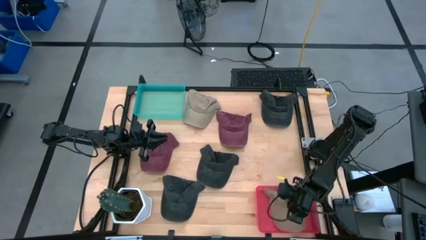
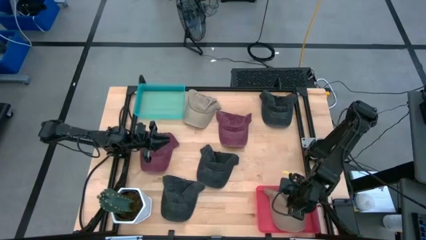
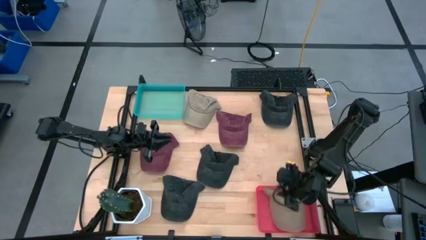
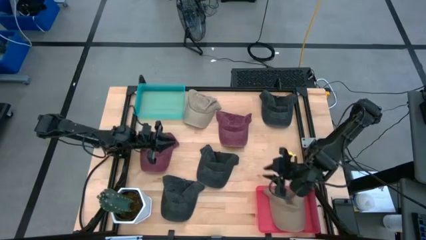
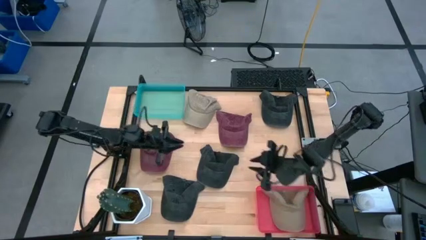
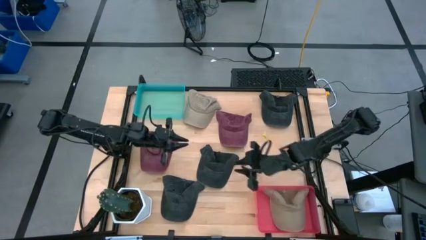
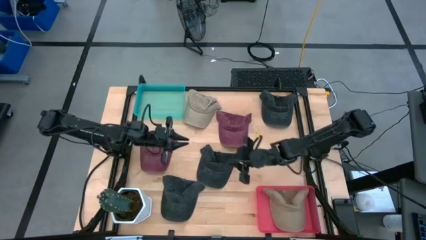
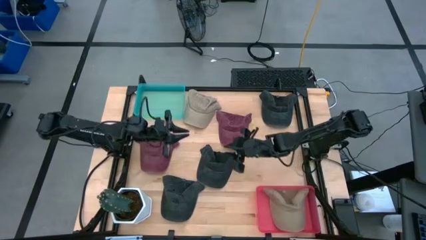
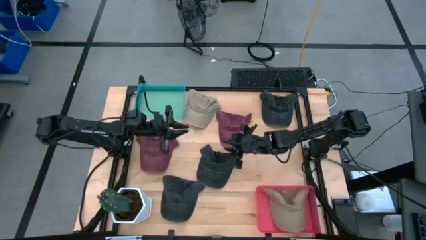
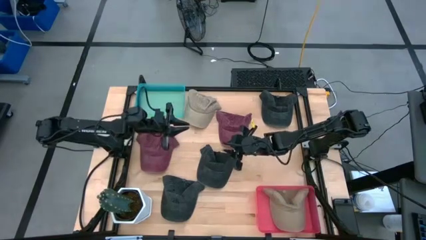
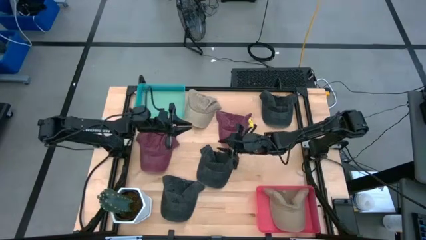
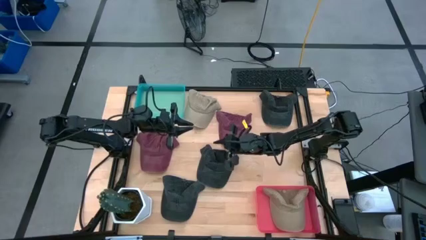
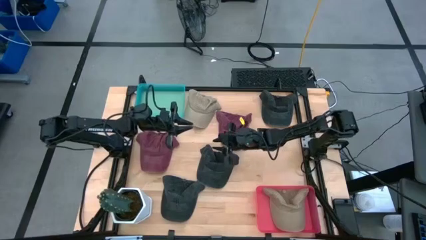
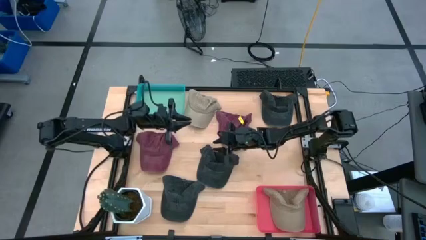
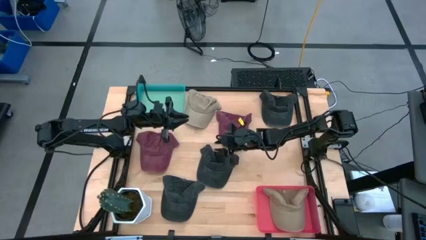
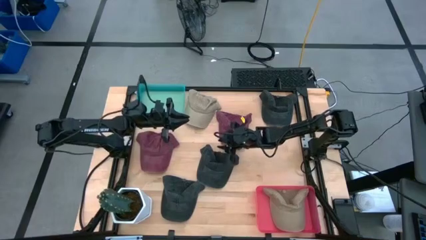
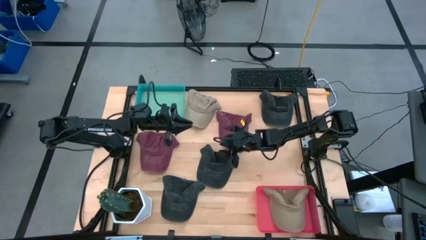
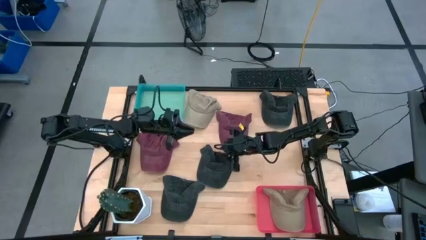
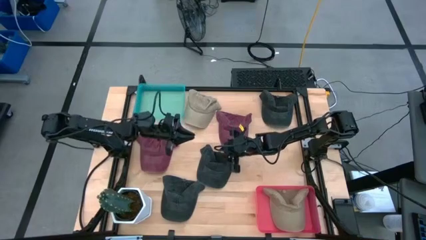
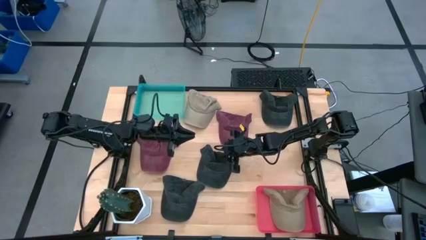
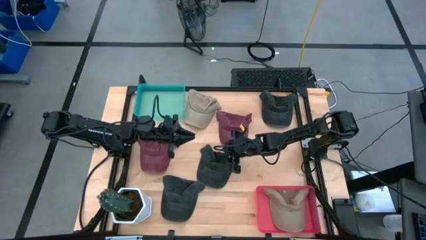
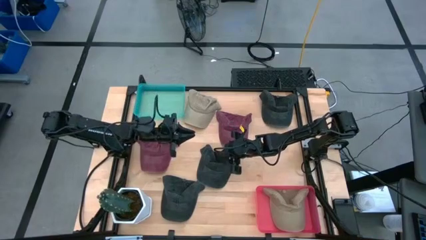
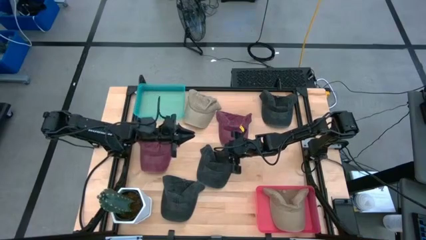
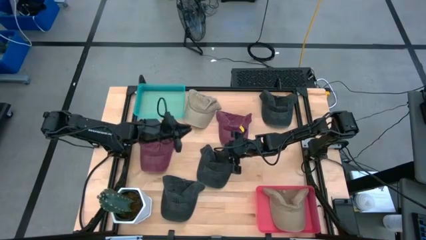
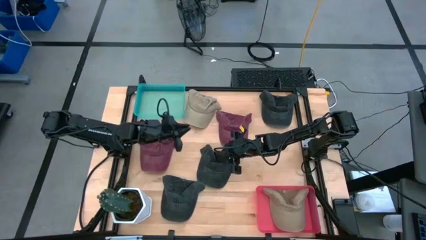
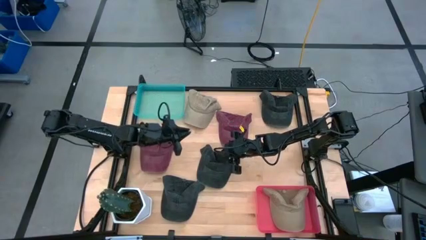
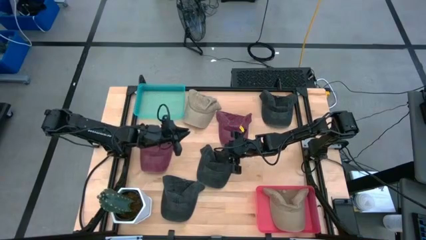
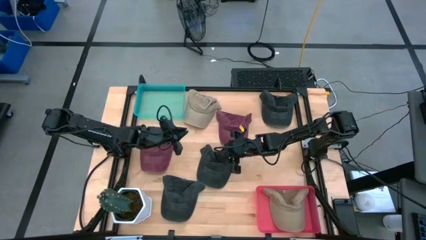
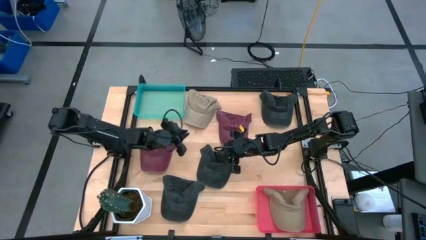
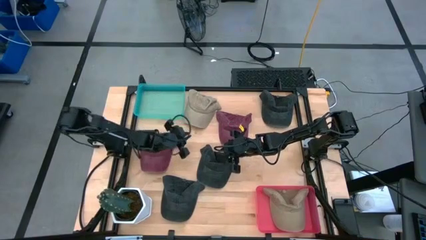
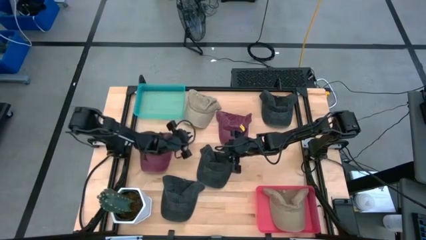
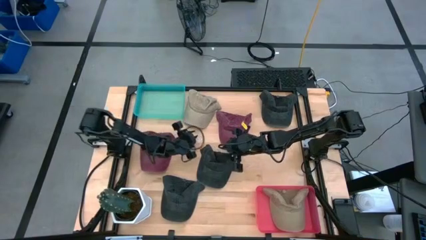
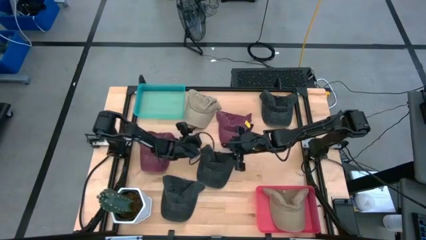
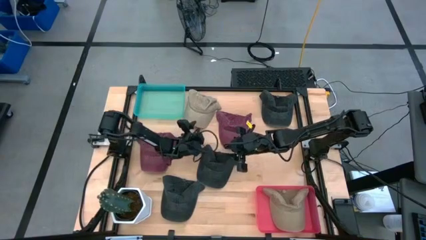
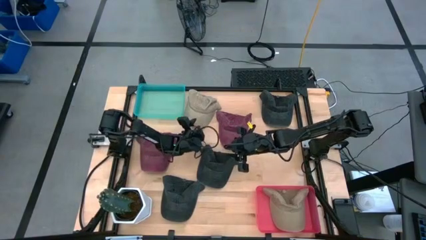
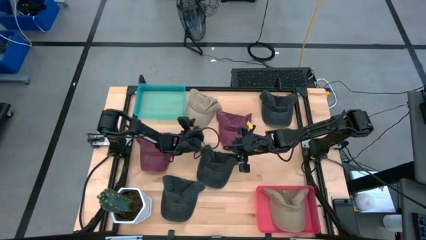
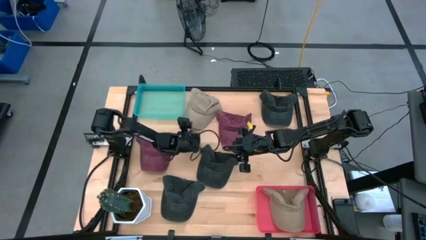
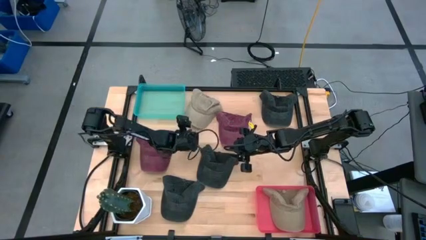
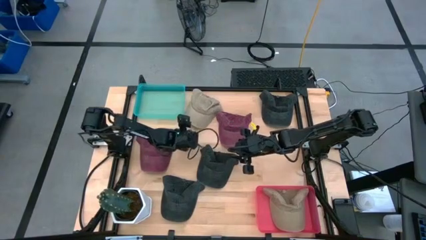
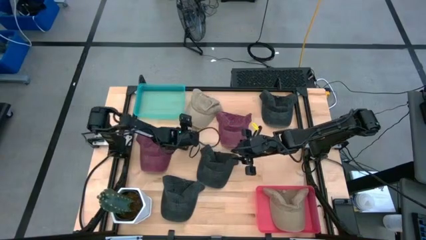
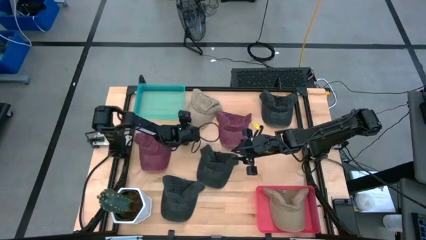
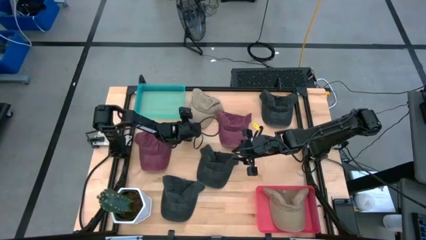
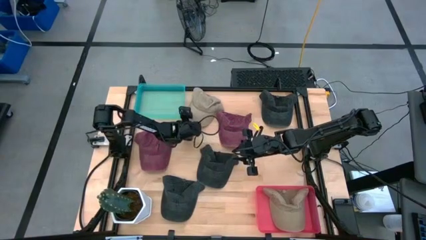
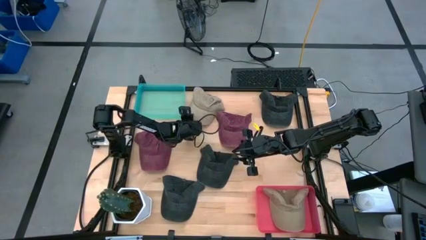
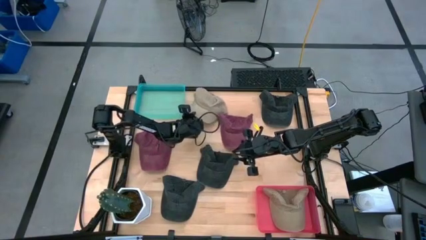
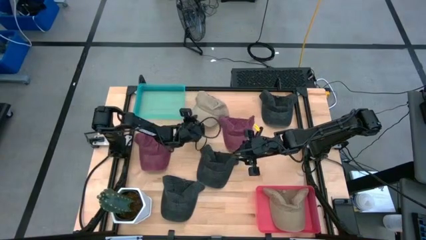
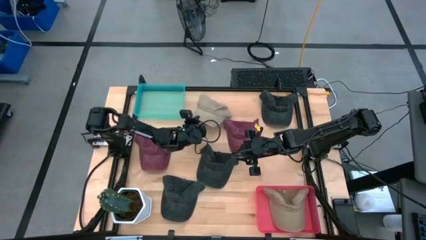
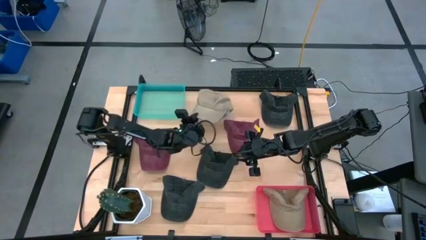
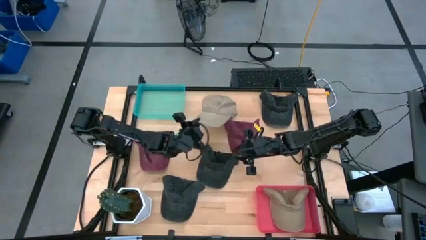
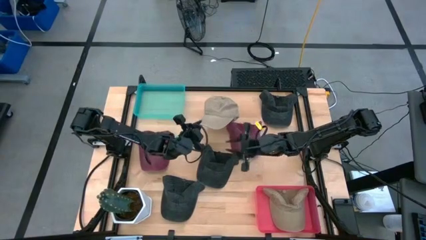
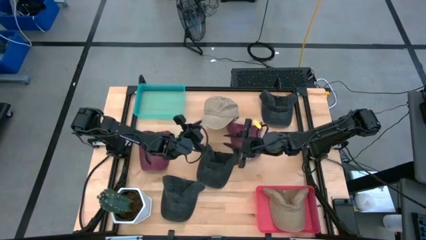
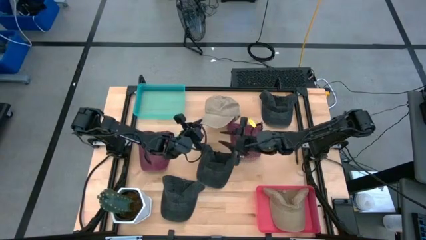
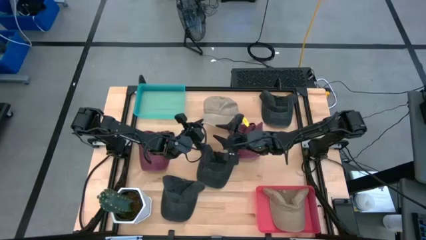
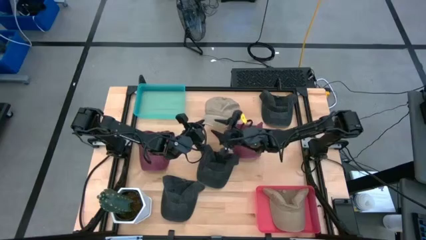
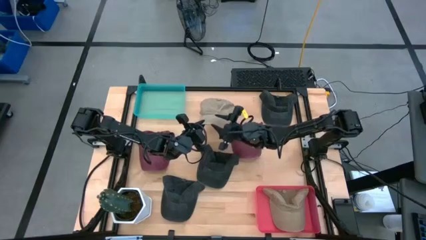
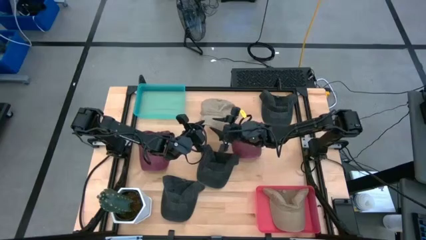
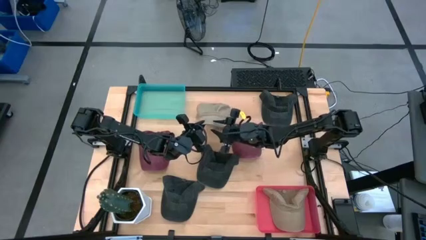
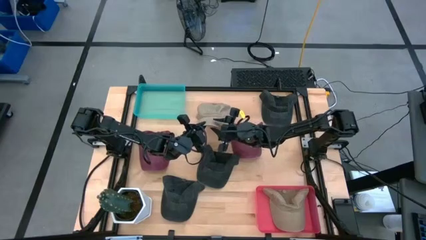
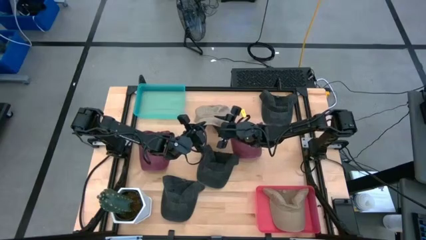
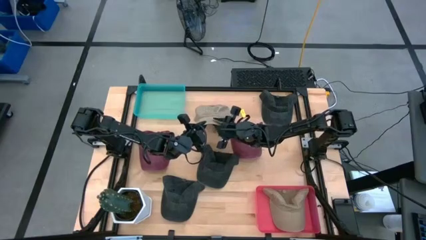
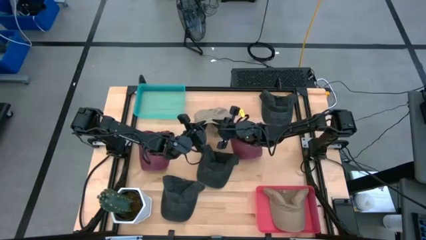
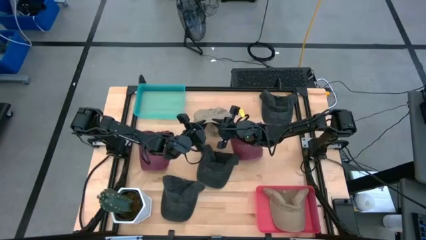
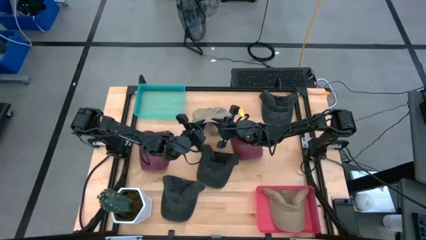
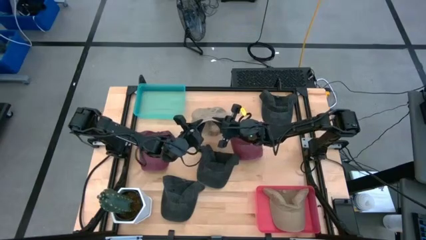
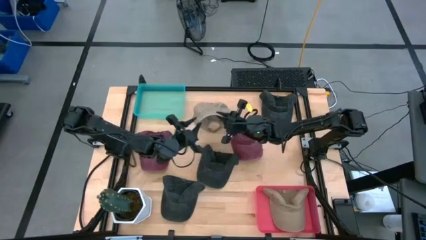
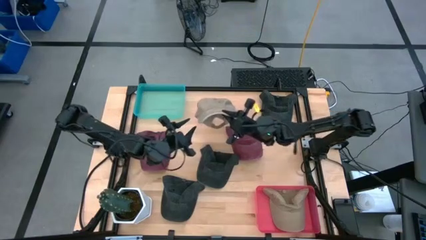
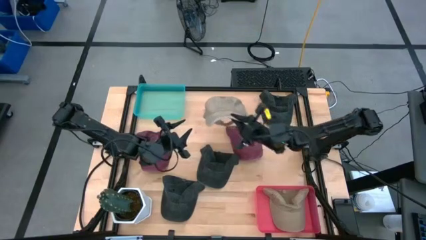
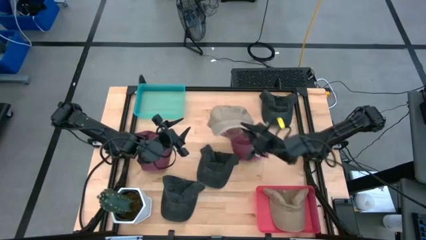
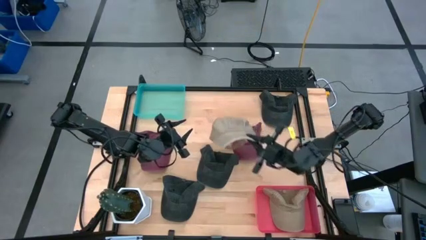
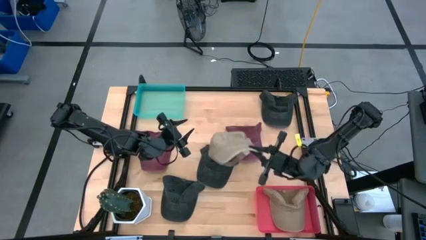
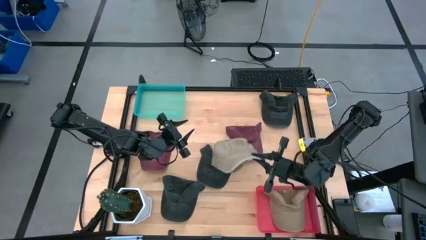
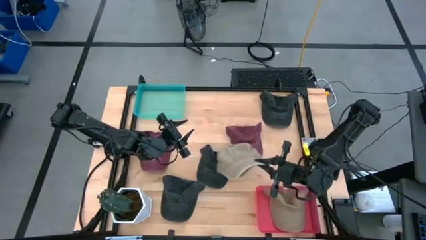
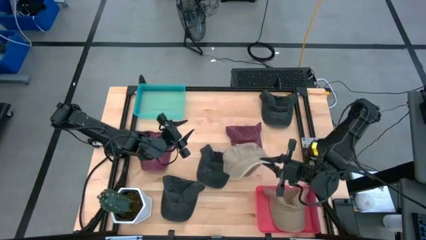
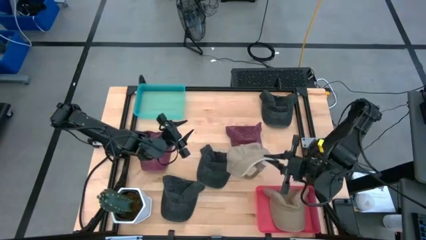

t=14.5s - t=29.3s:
Task: Pick & Place hat
Put the brown cap into the pink bin
